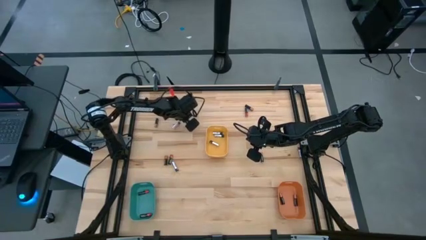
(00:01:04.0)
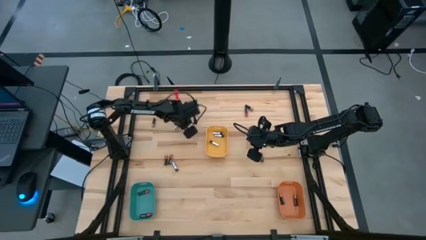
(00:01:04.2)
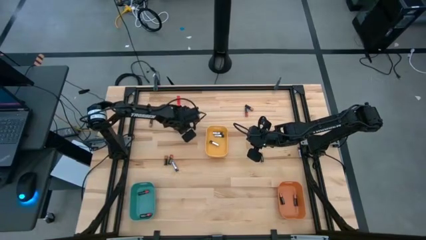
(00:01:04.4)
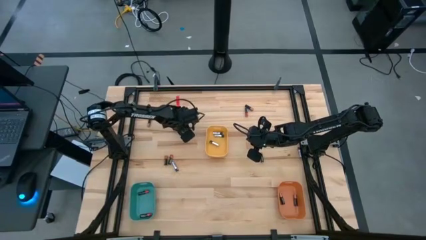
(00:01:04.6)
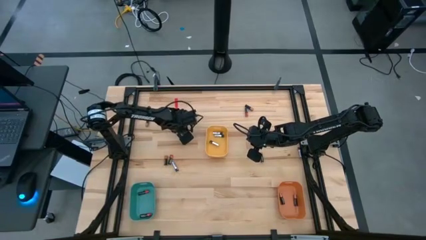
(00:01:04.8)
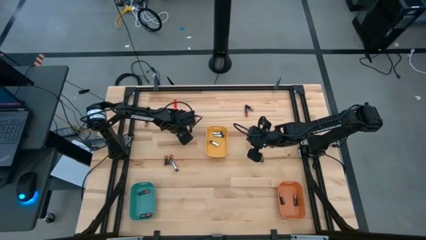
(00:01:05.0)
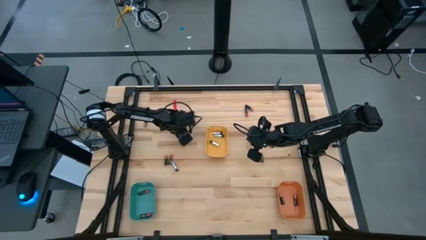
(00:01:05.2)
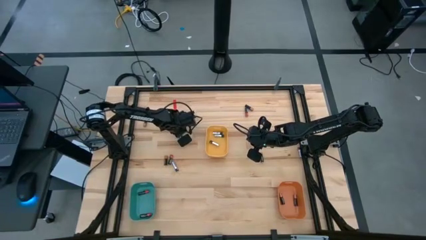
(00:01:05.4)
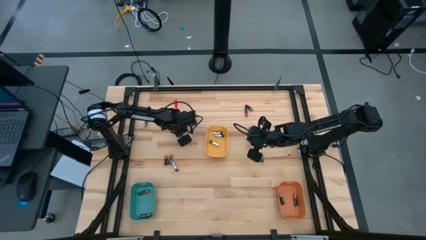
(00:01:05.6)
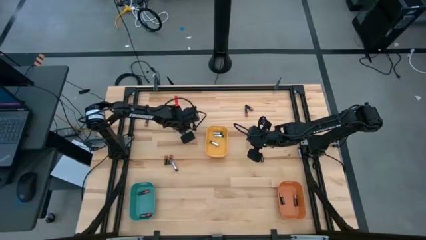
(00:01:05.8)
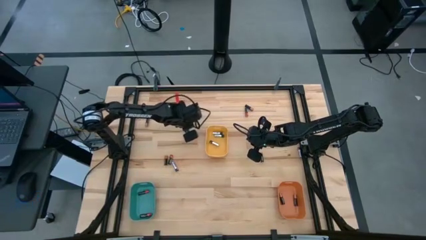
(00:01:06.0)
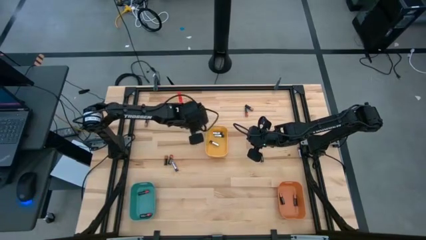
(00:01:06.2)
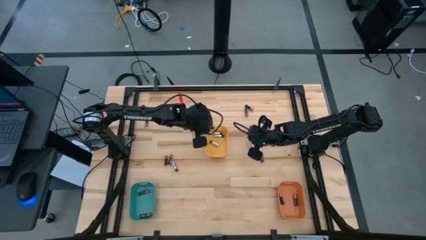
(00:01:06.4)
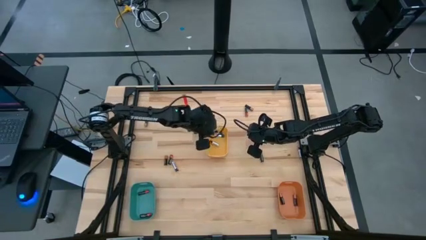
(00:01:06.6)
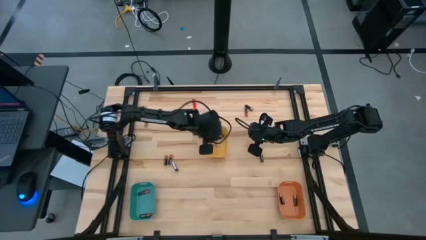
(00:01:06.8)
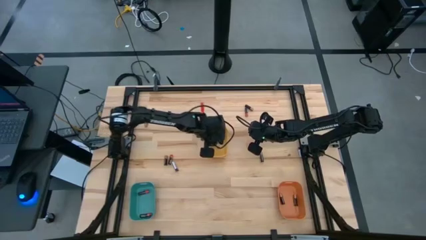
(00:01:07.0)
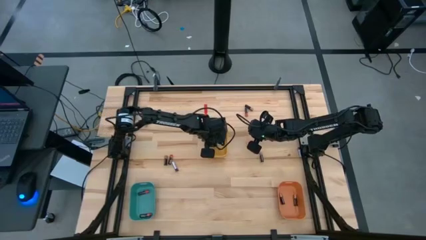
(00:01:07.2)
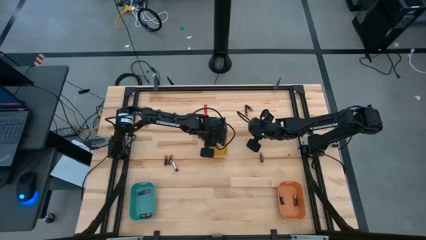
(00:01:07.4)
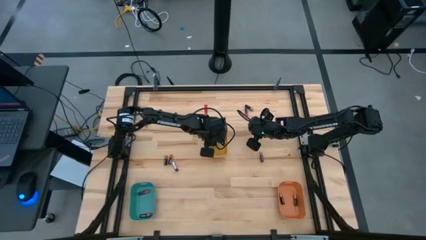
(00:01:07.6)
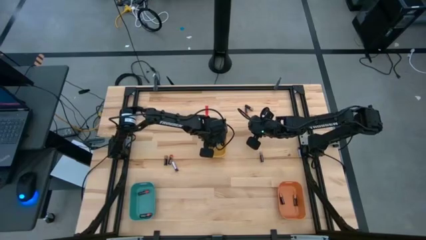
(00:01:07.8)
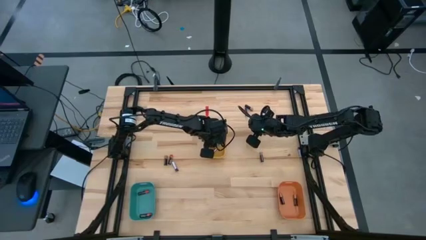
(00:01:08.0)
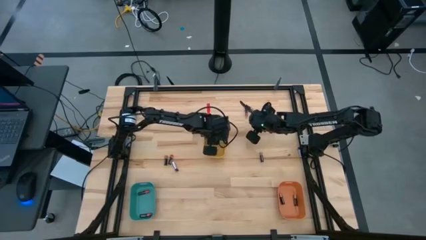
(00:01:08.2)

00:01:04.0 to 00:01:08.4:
Task: Sort batteries
Put the silver battery into the yellow bin

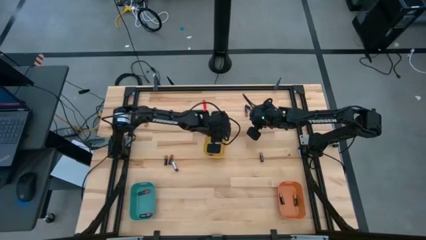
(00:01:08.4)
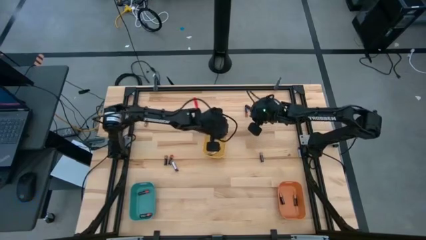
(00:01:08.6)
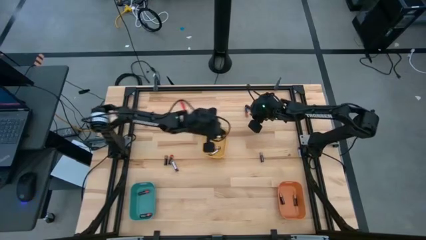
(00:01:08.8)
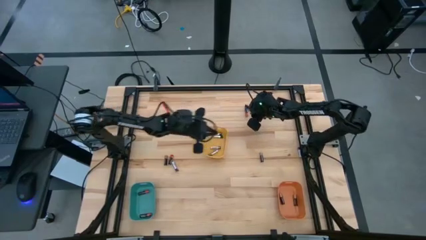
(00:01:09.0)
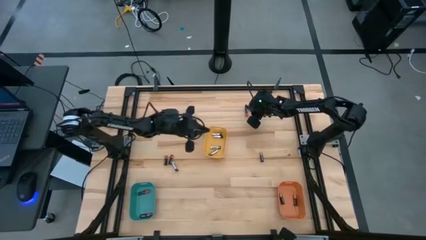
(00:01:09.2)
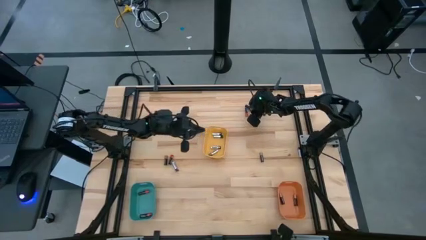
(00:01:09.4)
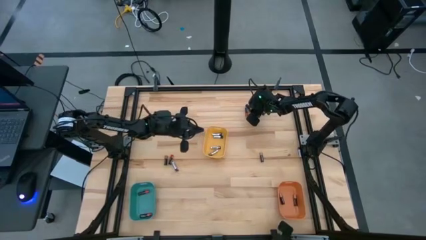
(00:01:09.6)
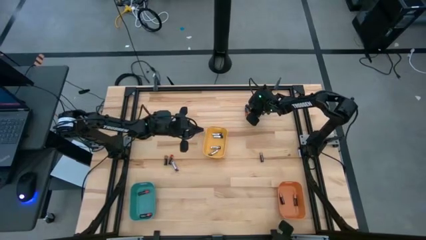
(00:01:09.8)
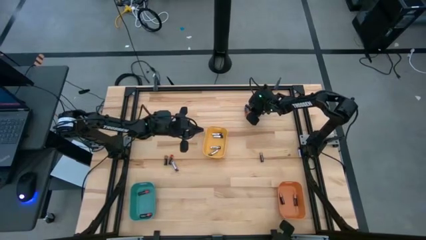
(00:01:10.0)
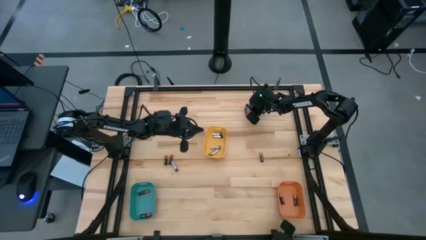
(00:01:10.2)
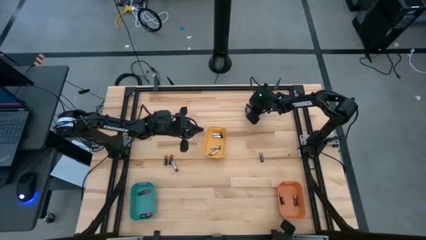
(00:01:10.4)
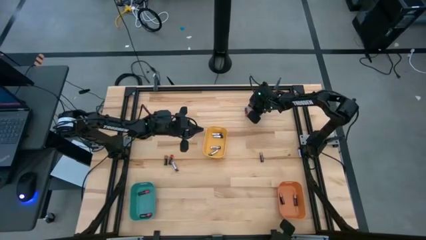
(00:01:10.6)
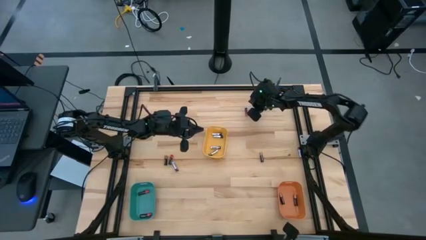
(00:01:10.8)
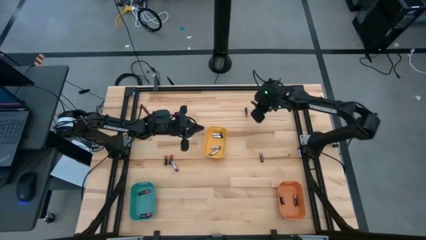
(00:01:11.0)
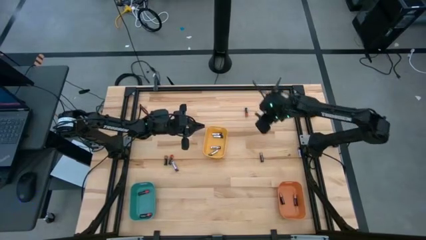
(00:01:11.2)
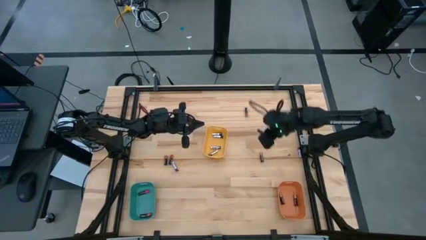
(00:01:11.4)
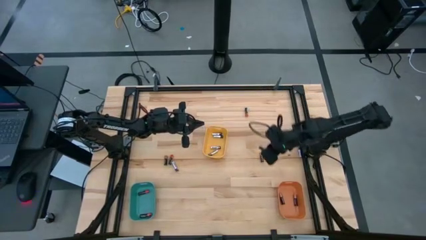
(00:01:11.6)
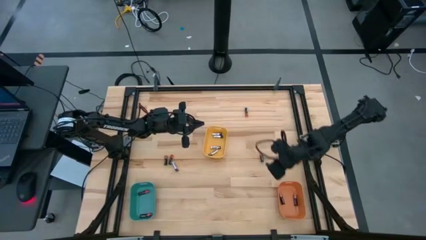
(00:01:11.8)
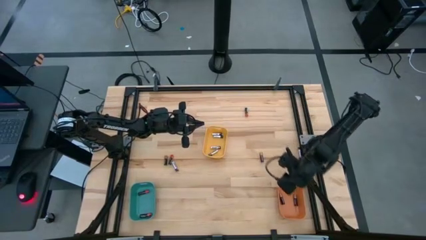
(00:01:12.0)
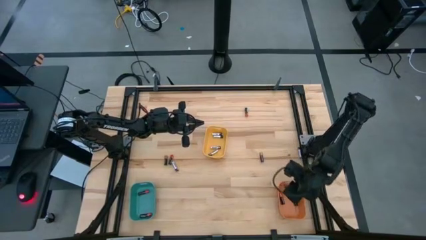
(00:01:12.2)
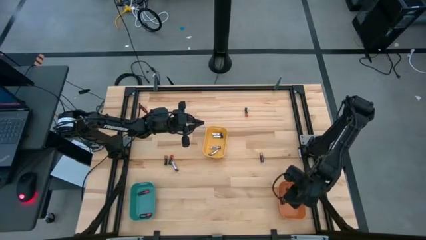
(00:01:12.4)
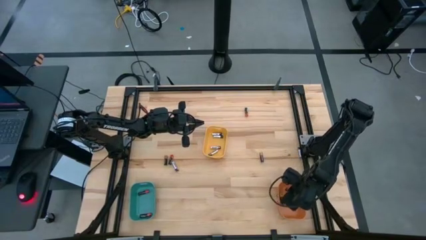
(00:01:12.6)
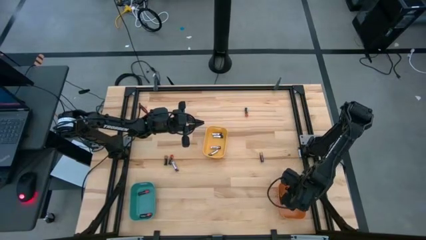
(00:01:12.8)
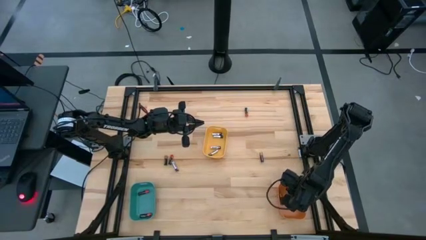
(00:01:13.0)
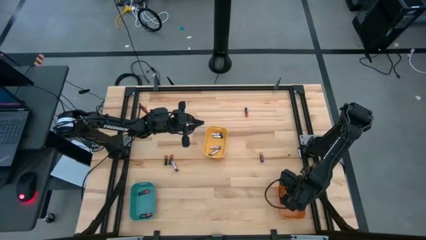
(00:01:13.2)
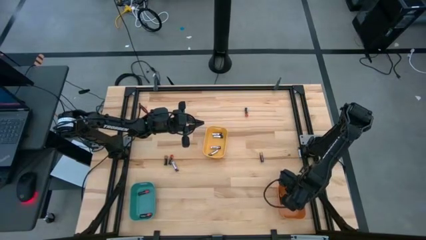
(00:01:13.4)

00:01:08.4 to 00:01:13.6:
Put the brown battery into the orange bin

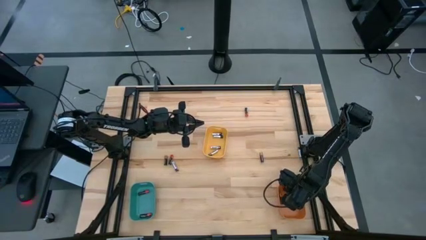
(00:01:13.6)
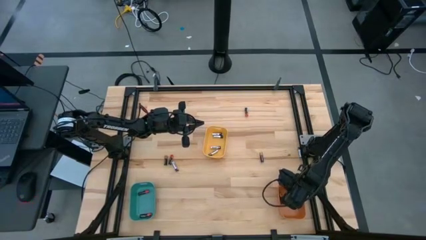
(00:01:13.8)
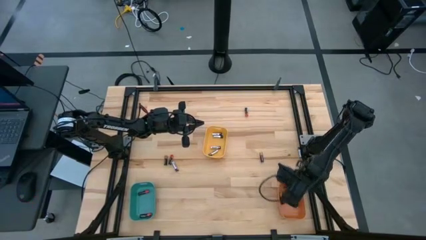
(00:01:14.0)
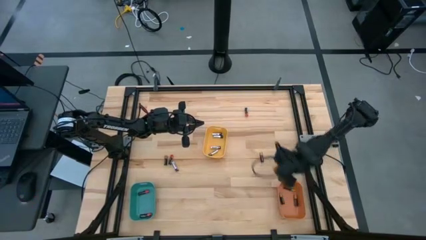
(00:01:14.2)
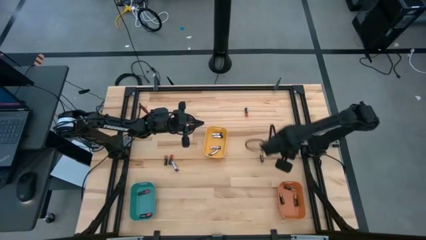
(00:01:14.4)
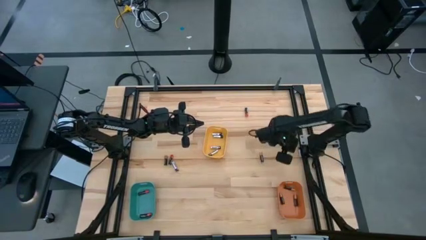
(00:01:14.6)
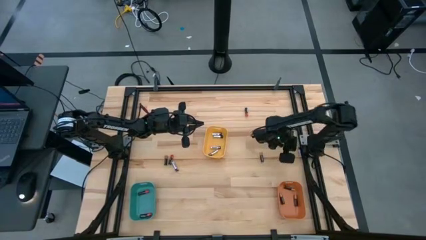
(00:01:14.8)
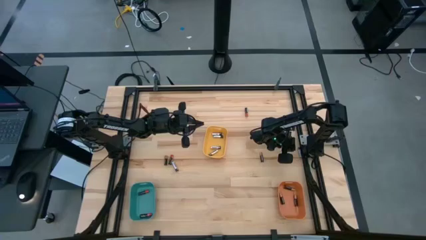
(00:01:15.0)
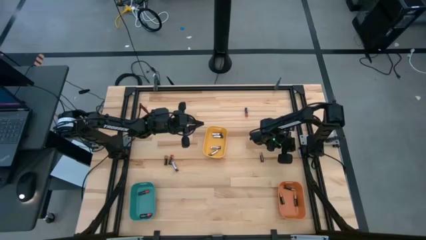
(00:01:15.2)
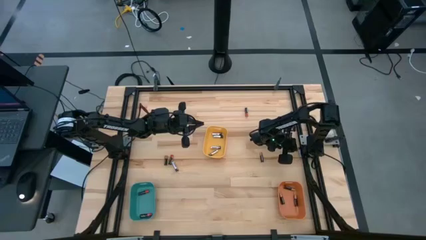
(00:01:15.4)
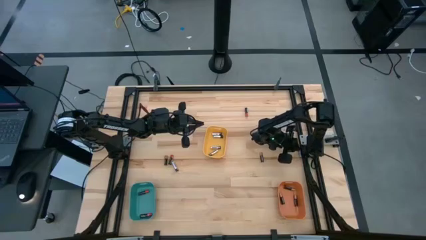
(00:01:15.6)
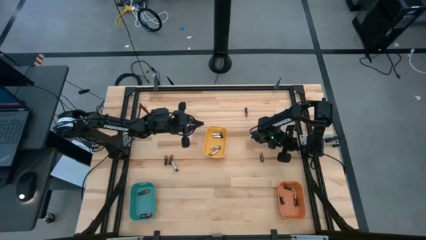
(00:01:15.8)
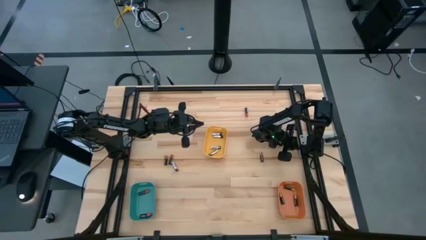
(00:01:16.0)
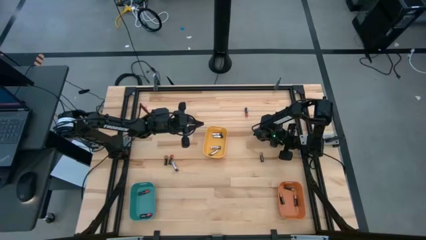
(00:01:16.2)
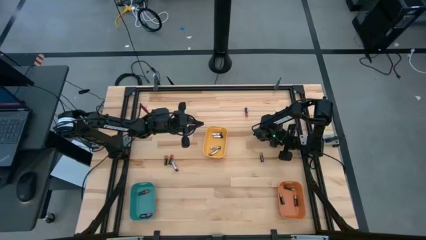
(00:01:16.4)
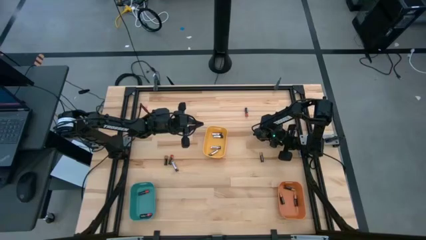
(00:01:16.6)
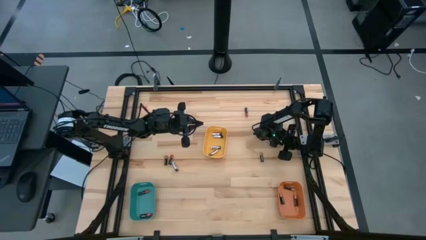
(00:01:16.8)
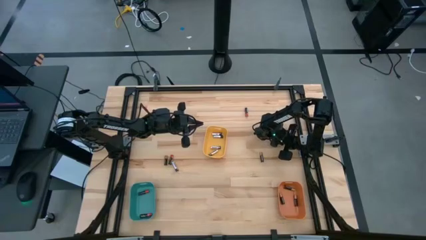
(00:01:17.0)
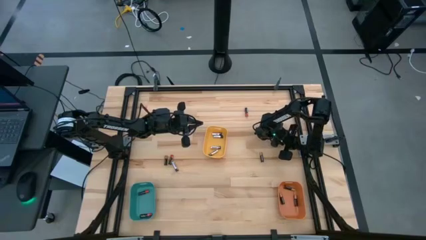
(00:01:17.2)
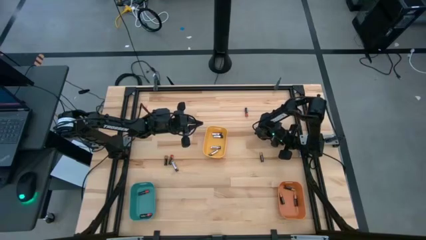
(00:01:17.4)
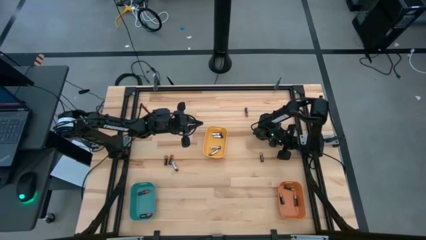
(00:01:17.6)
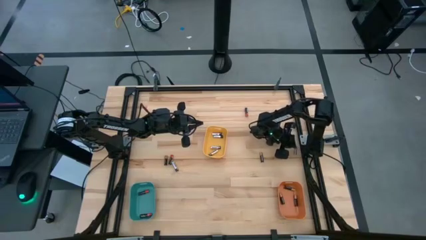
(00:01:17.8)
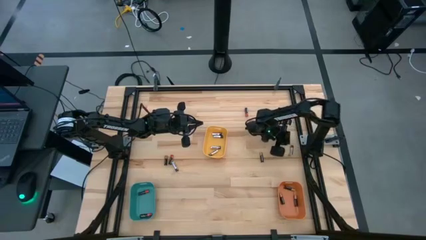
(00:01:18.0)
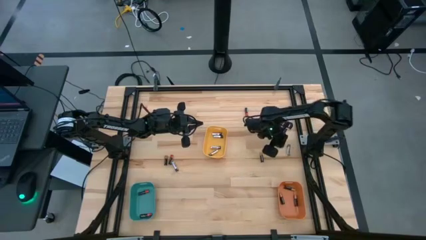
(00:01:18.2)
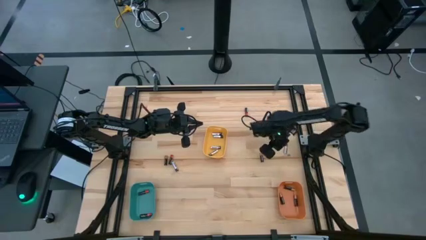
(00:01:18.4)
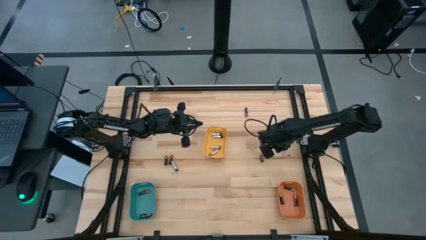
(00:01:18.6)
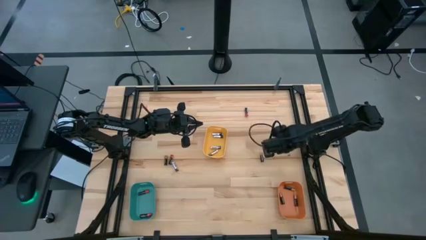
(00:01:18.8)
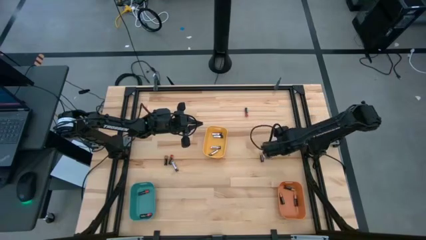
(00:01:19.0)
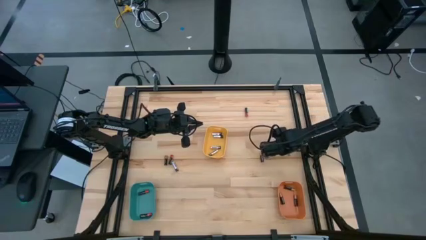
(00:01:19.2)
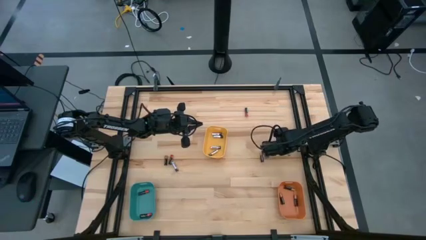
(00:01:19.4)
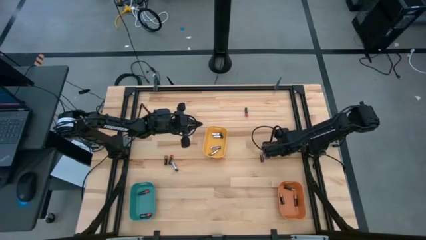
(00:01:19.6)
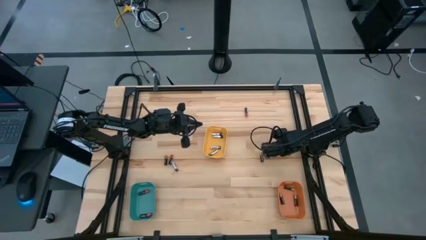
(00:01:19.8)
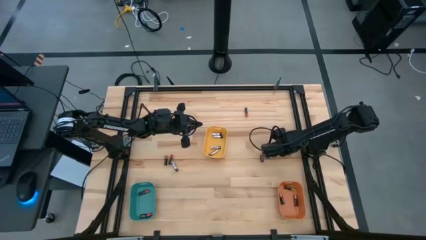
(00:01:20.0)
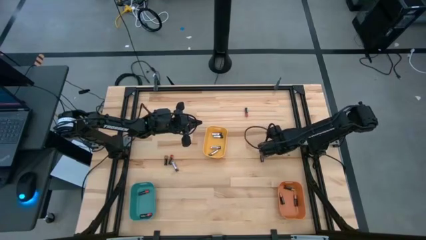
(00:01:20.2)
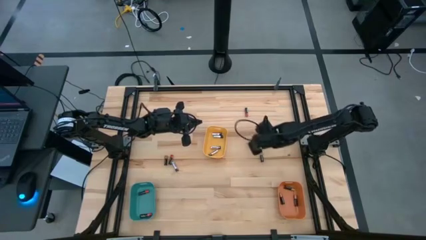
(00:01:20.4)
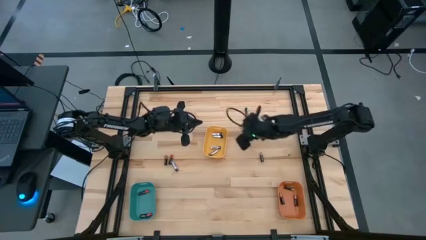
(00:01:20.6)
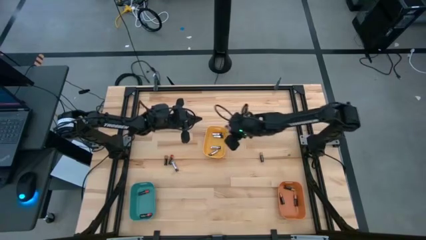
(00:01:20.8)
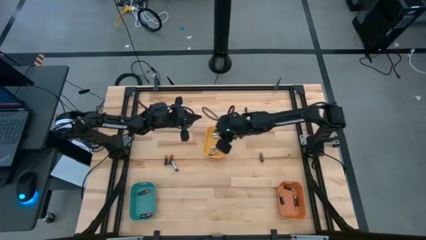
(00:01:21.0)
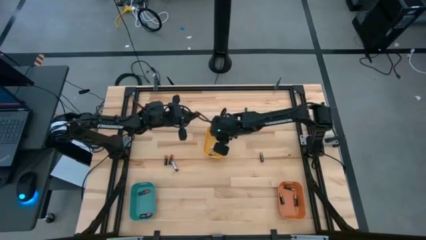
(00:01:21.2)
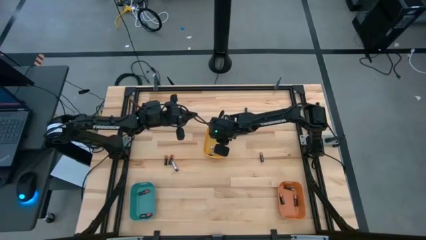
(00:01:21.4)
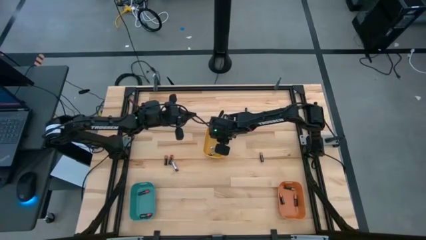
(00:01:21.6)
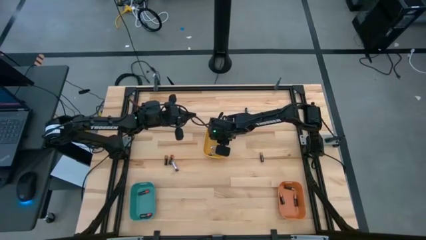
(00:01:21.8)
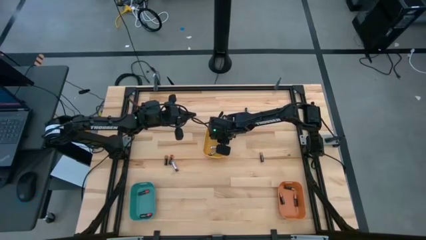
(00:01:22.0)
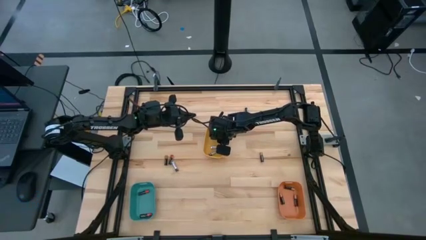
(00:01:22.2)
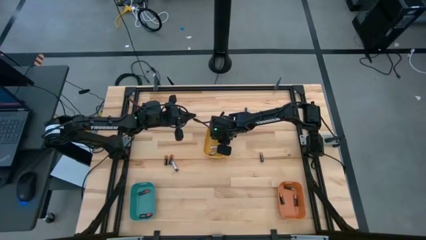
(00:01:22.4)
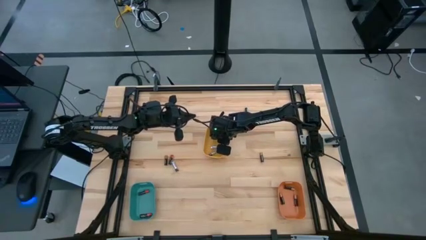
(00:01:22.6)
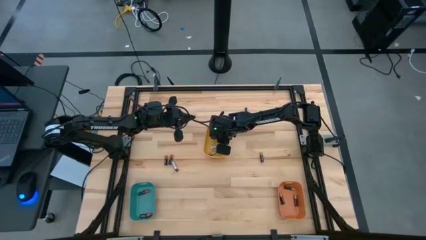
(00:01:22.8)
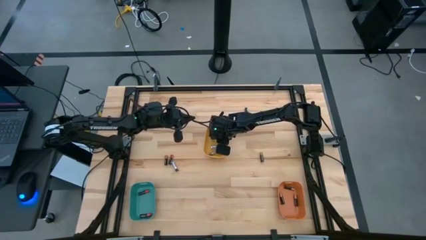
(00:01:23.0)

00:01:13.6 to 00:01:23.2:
Put the silver battery into the yellow bin
